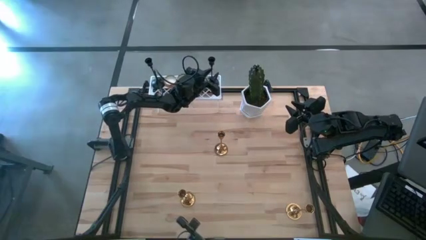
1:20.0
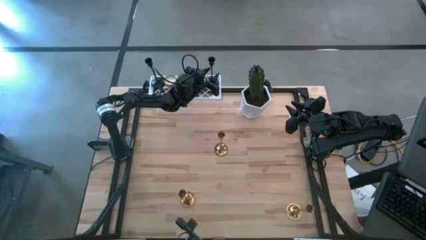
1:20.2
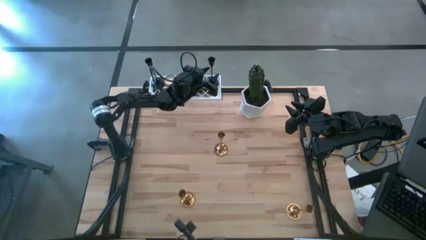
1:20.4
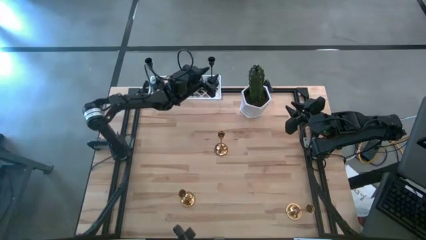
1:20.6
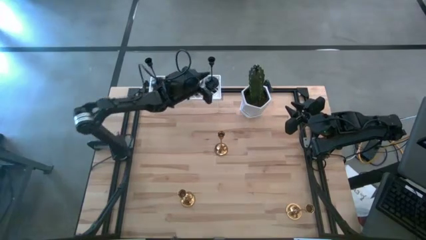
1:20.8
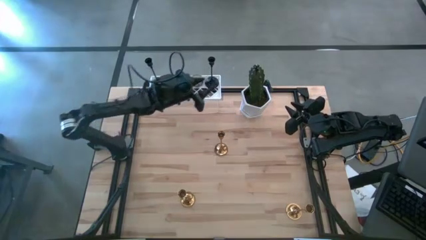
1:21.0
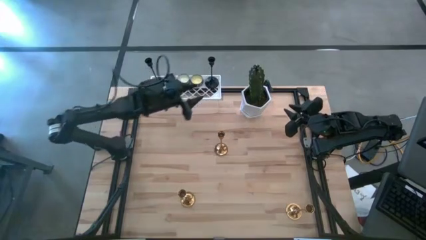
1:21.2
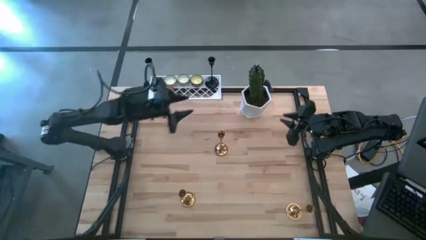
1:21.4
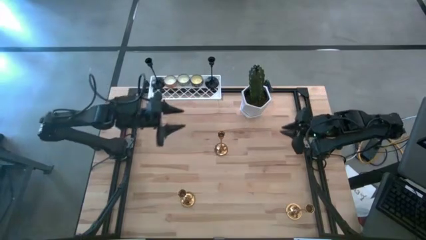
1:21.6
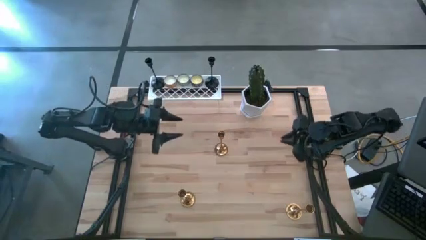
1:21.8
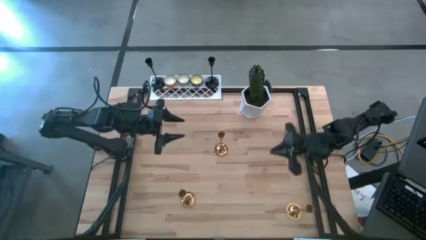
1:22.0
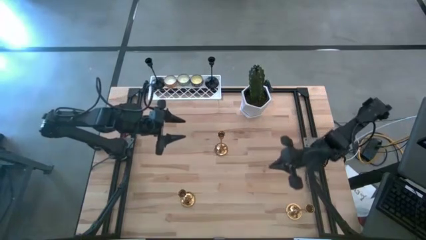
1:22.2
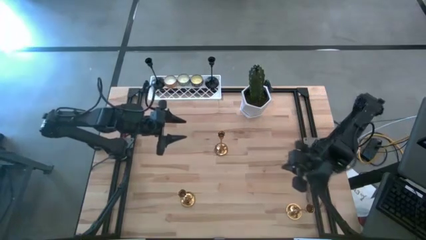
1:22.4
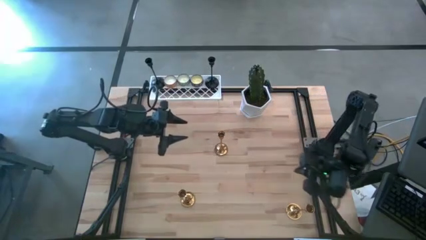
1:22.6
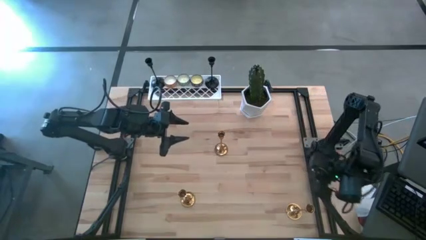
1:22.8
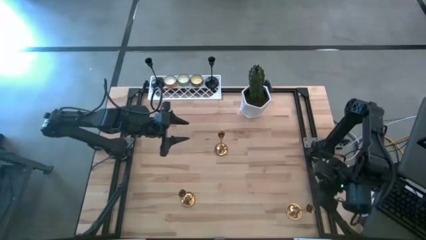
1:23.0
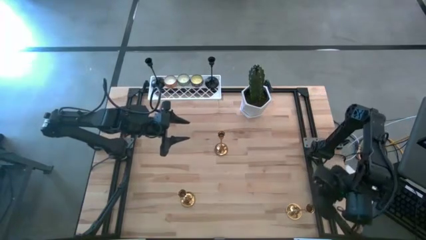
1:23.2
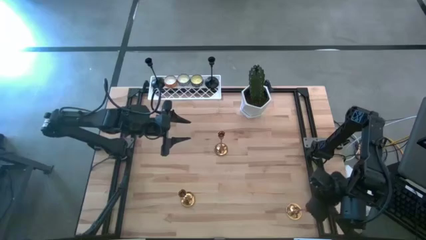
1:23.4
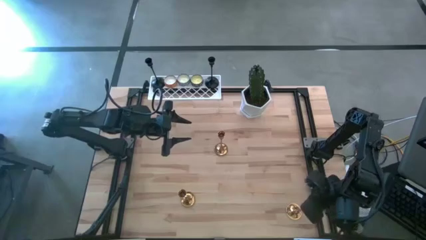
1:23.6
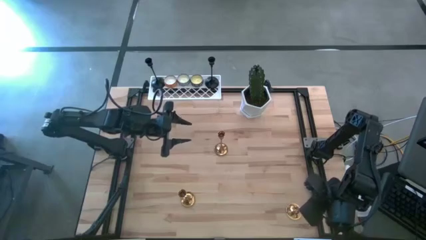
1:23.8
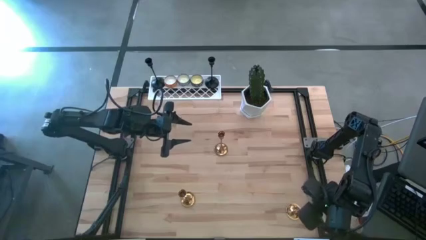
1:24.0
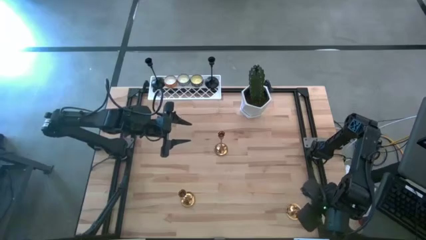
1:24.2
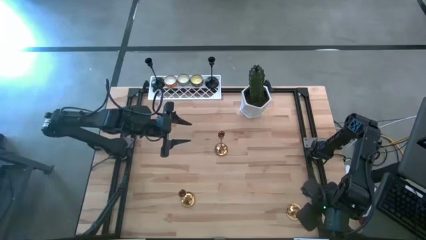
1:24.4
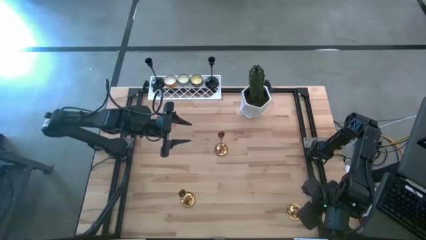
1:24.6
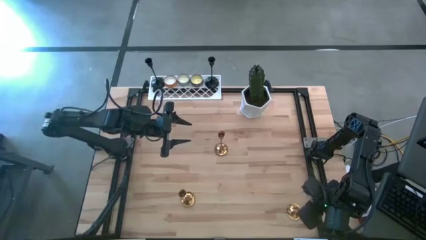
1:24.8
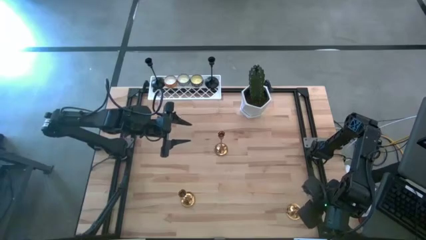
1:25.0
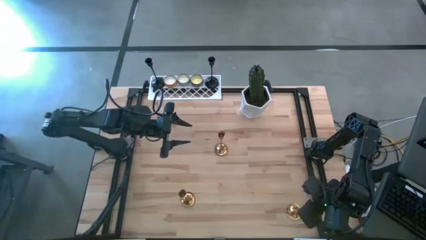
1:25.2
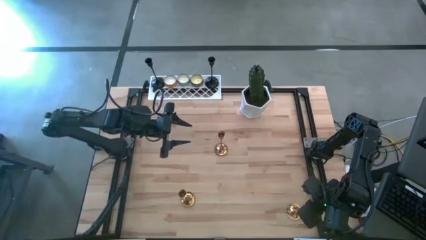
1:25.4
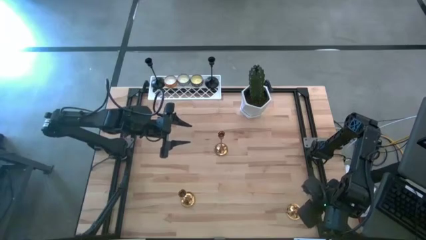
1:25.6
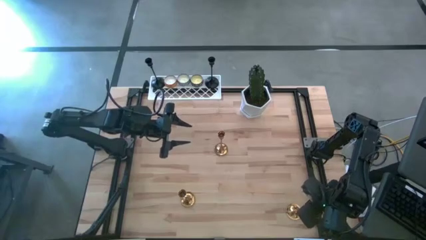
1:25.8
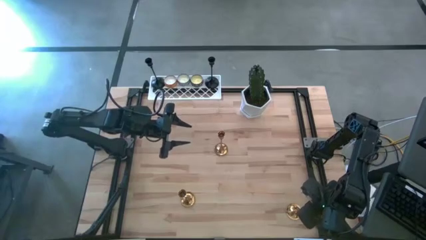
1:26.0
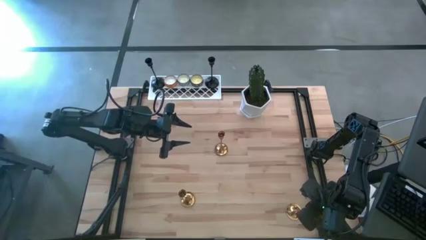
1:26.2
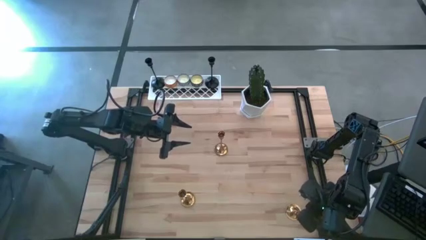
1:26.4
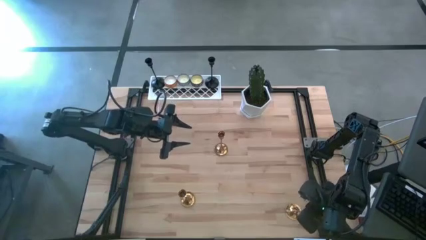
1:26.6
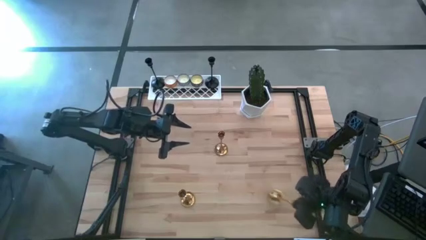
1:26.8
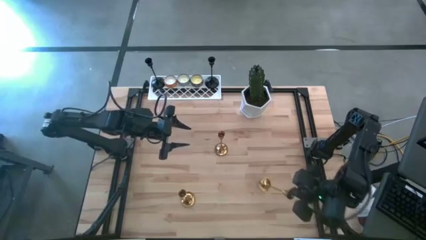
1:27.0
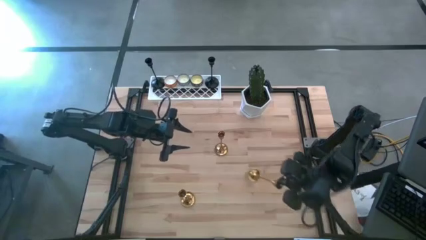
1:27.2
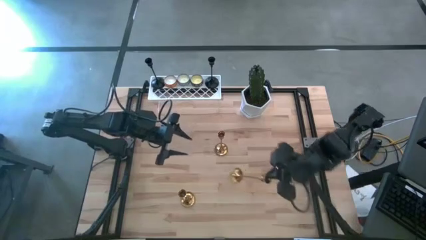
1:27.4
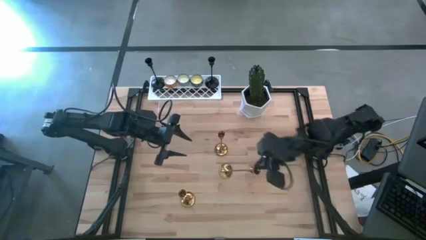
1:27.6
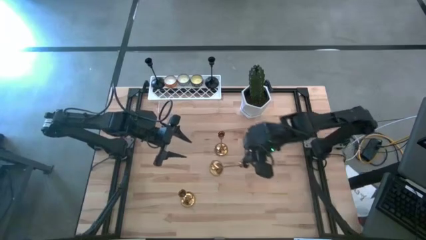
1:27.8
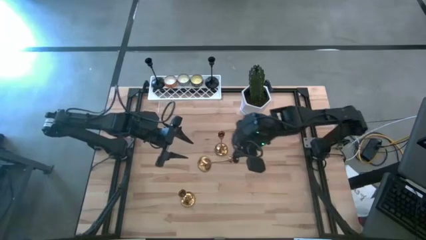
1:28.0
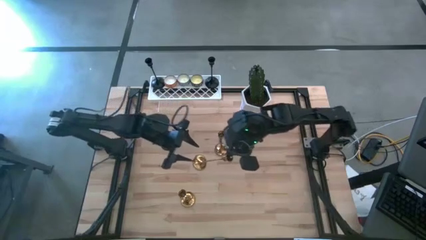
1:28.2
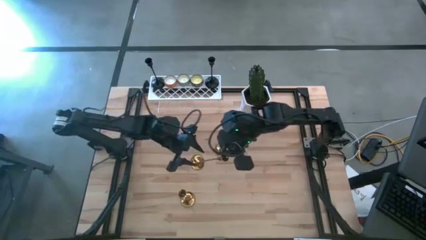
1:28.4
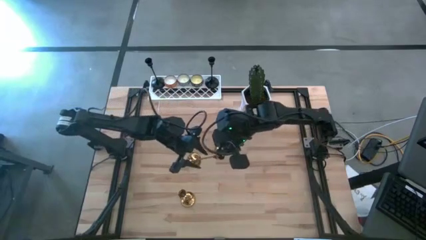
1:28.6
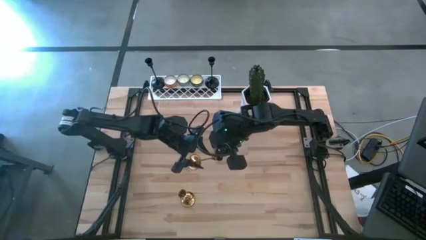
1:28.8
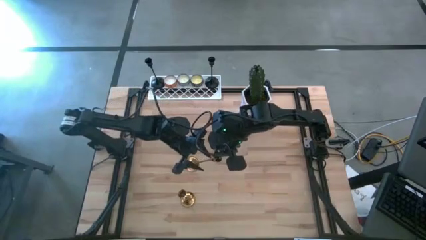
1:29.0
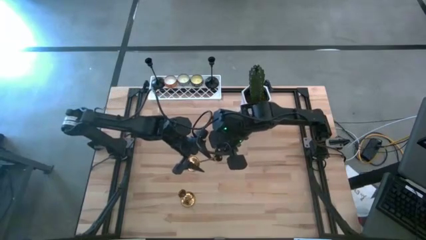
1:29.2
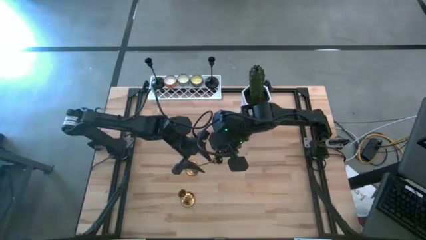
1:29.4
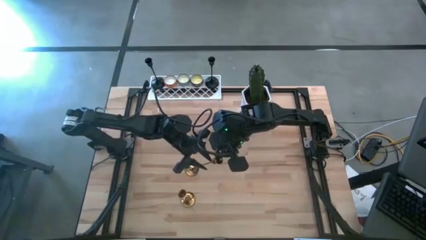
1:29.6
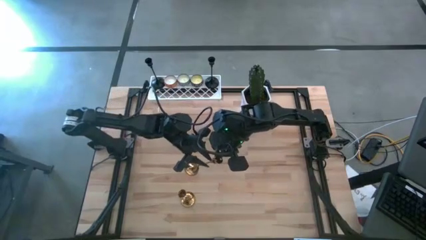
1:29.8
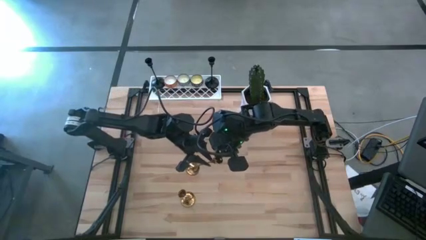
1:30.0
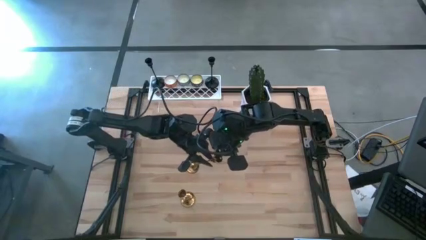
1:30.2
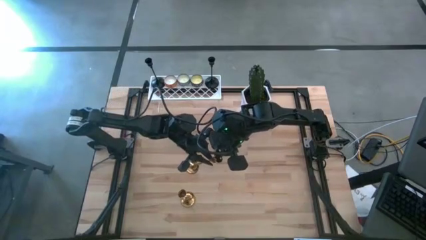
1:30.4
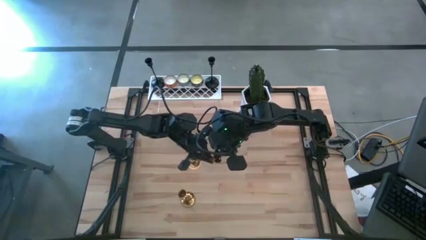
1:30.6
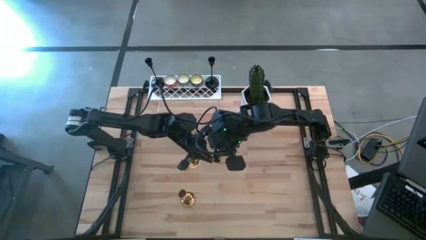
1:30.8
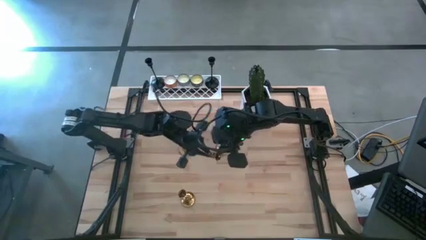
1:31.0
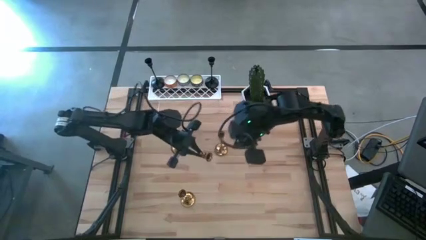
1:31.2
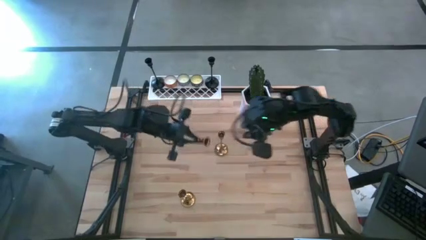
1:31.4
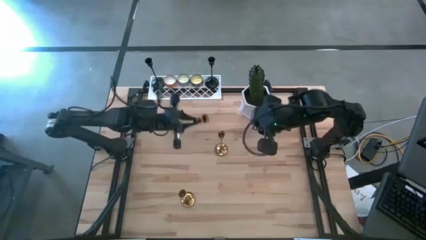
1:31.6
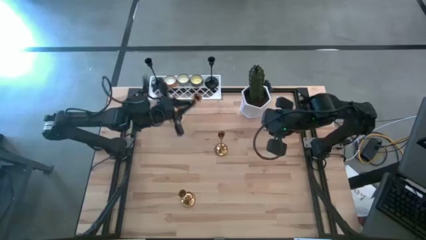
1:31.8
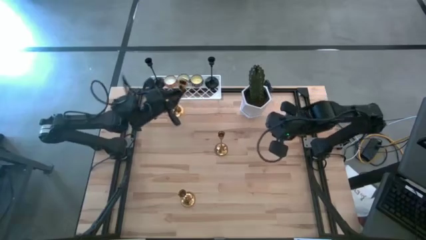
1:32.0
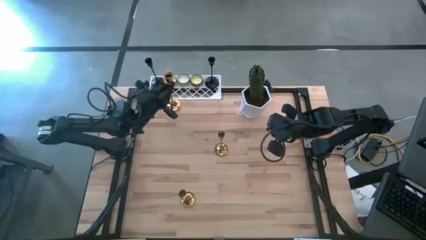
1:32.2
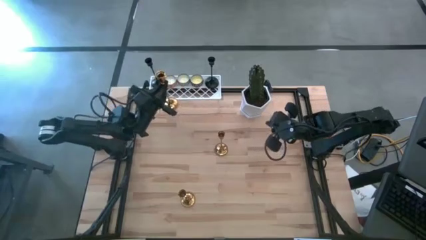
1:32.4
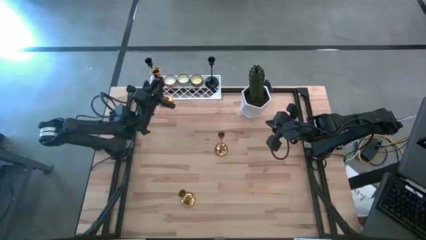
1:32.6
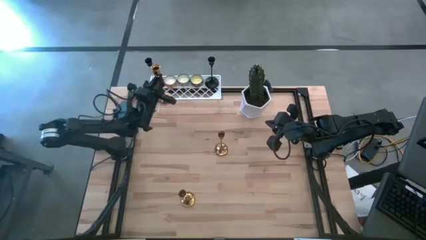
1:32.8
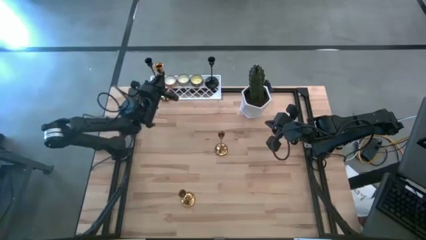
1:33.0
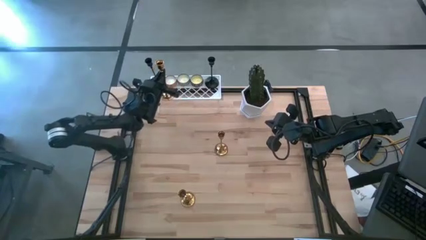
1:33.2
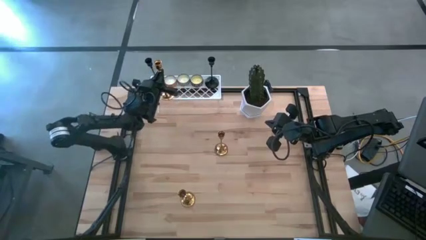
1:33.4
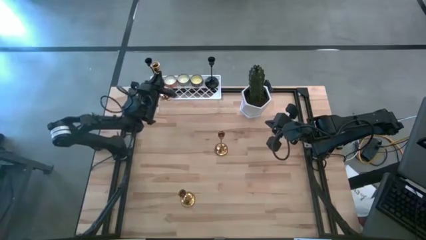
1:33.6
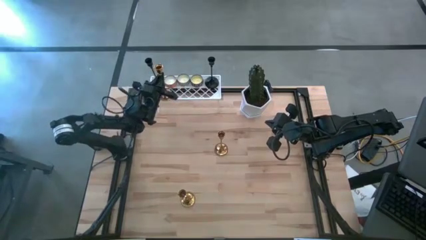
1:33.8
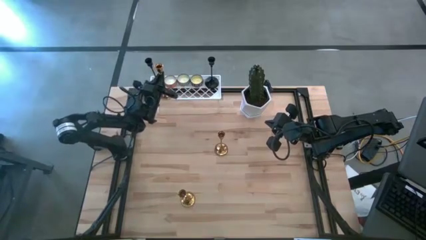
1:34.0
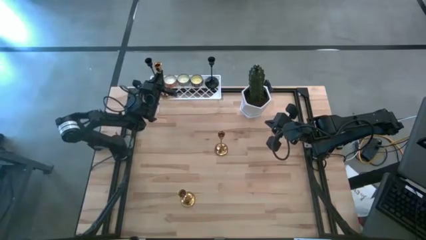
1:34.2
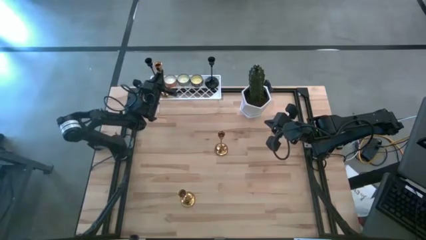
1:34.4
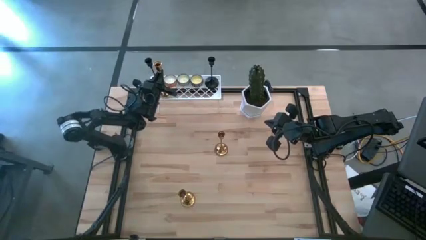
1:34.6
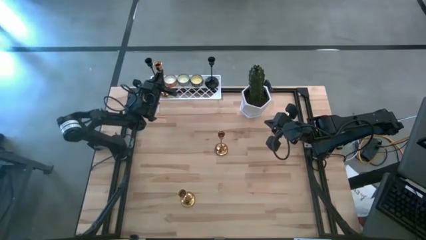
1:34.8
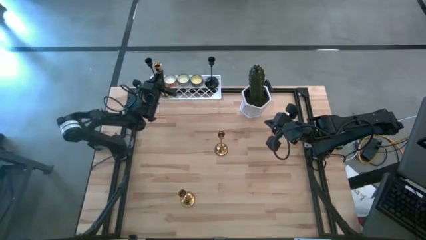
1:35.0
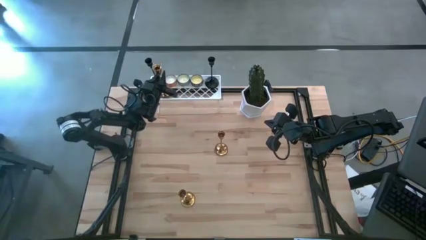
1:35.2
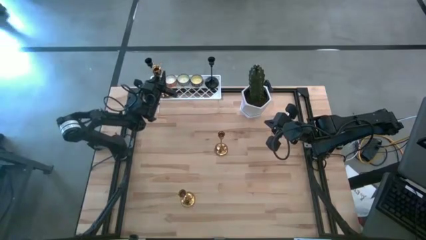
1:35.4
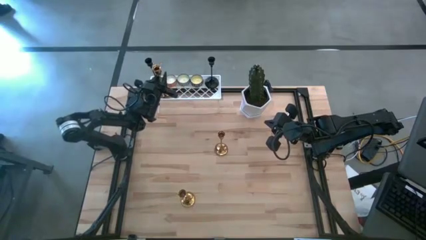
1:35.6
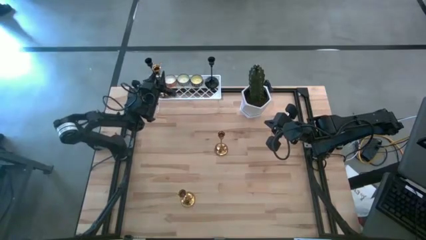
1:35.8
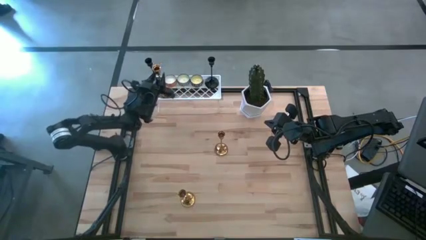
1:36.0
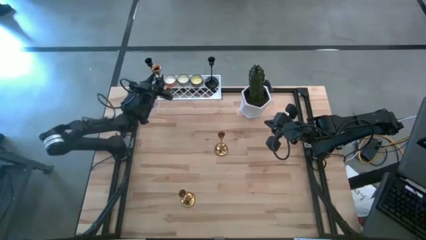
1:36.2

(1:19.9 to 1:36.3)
Task: Pick & Place candle stick holders
Put the bottom right golden candle holder on the shelf

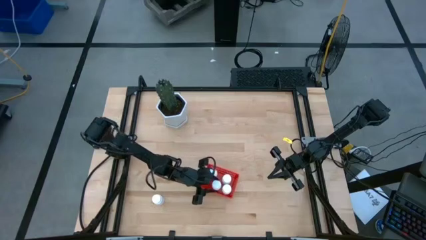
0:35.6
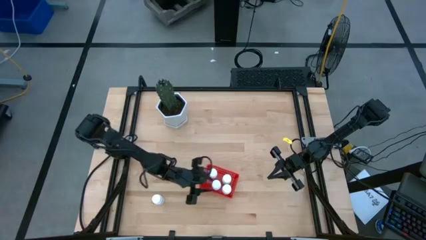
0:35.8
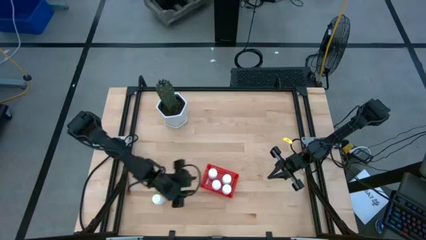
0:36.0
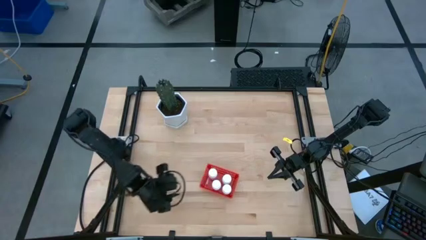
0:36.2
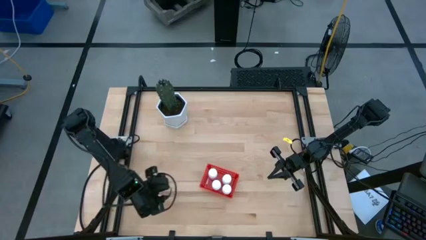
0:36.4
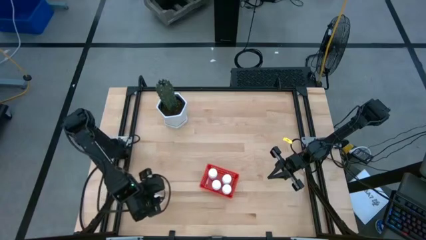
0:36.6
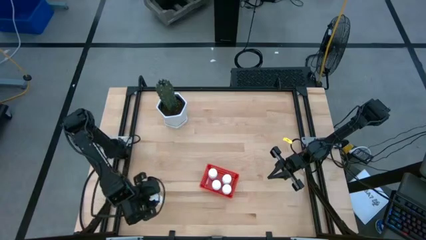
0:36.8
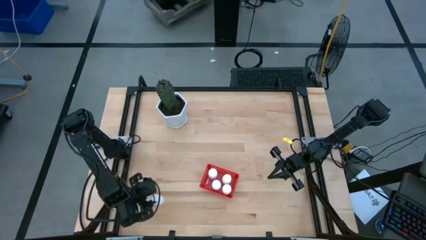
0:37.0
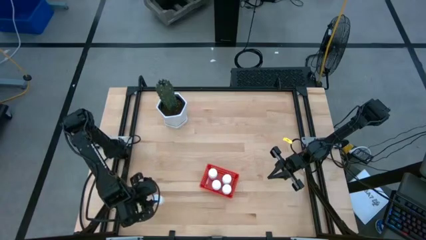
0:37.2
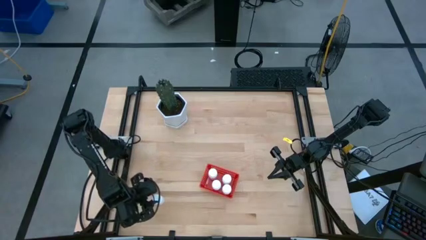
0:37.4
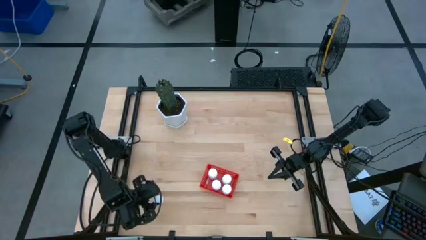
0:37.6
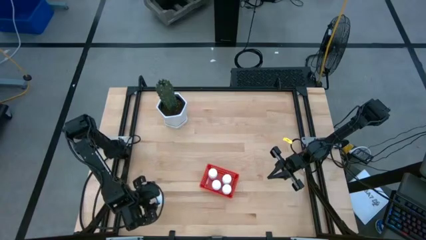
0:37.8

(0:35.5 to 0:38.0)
Task: Pick and place pill bottles into a basket
Put the white pill bottle into the red bin
